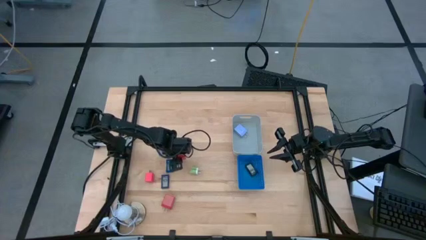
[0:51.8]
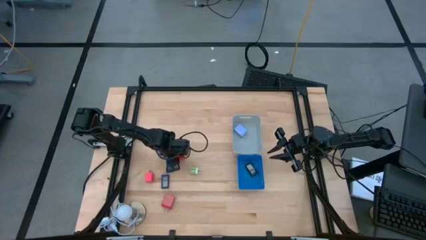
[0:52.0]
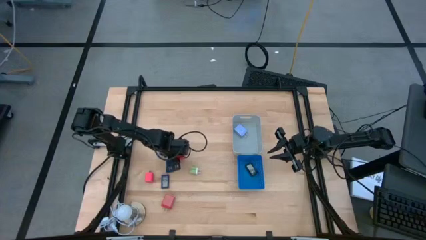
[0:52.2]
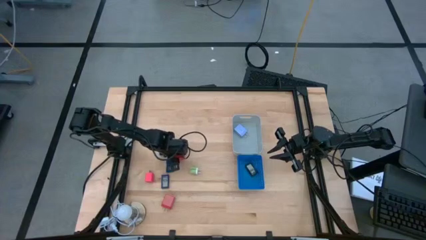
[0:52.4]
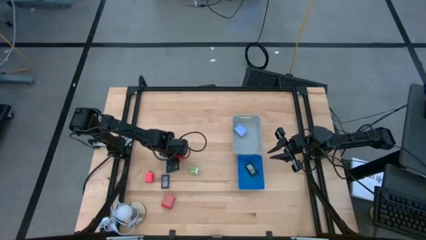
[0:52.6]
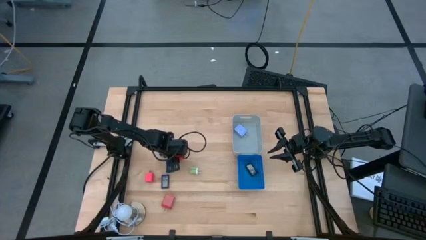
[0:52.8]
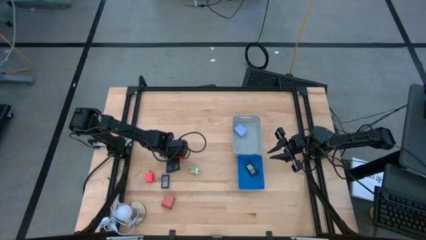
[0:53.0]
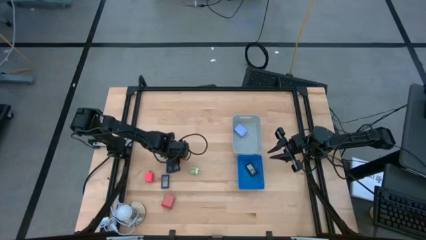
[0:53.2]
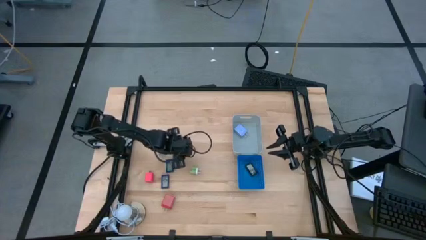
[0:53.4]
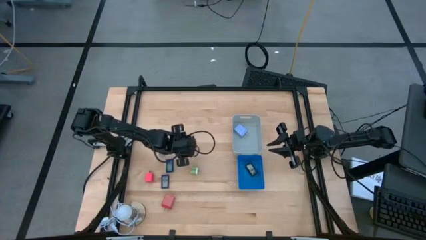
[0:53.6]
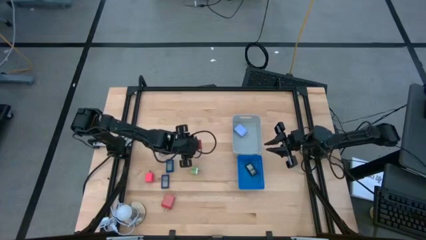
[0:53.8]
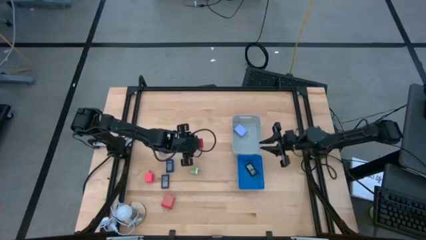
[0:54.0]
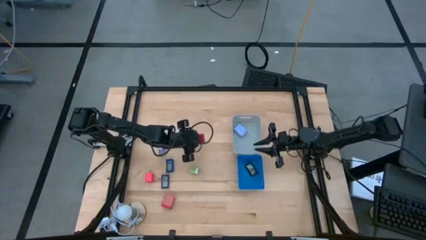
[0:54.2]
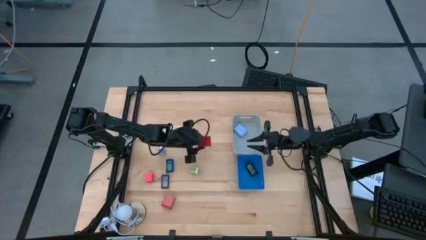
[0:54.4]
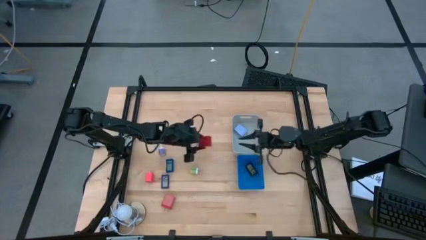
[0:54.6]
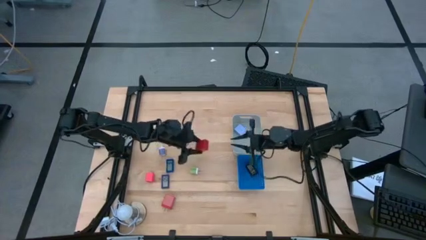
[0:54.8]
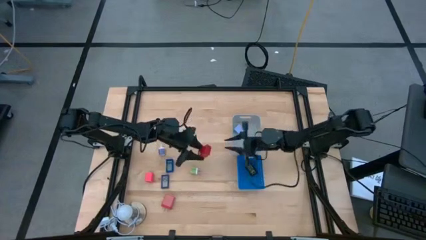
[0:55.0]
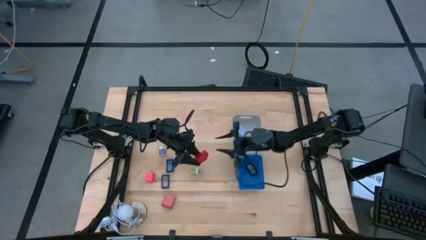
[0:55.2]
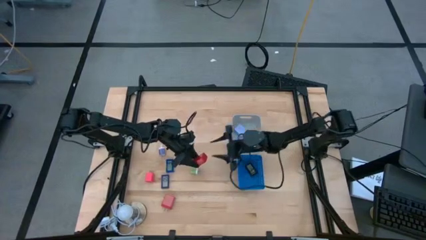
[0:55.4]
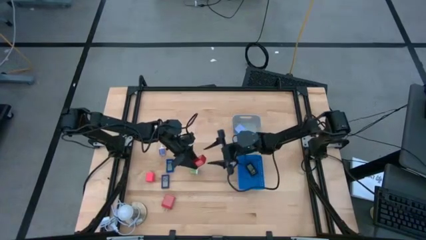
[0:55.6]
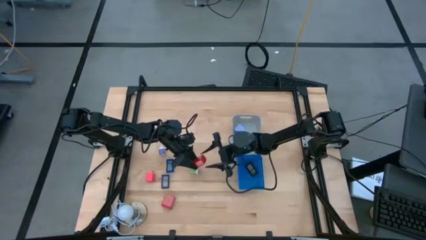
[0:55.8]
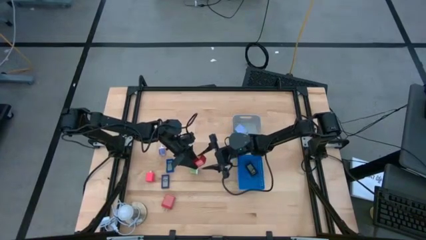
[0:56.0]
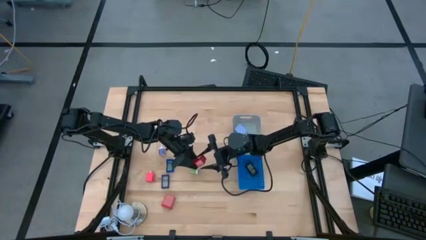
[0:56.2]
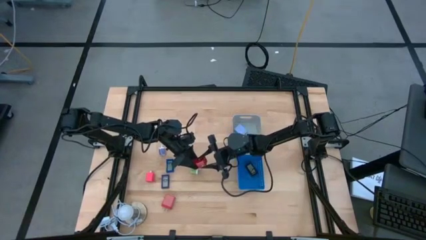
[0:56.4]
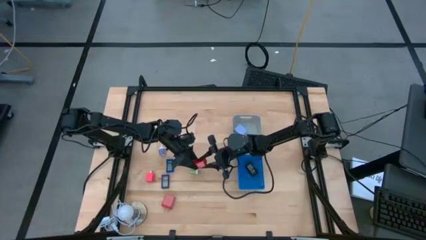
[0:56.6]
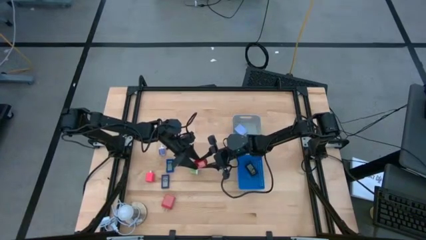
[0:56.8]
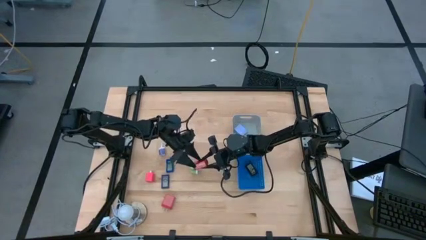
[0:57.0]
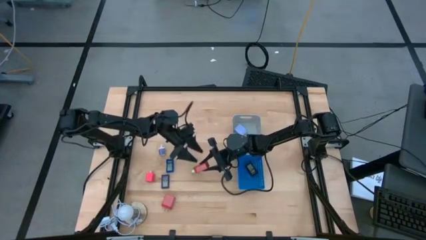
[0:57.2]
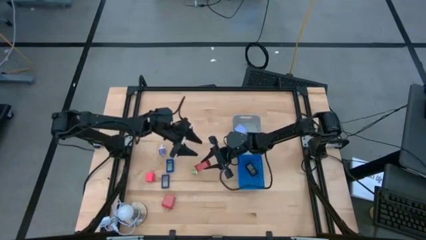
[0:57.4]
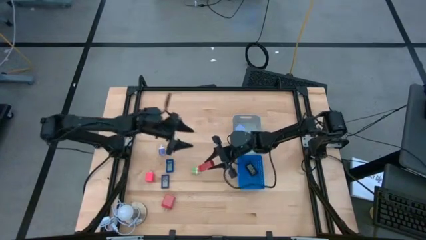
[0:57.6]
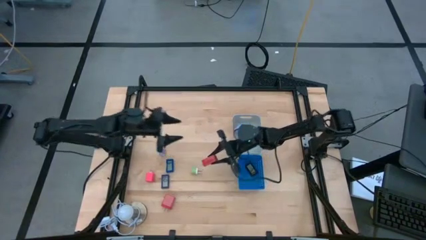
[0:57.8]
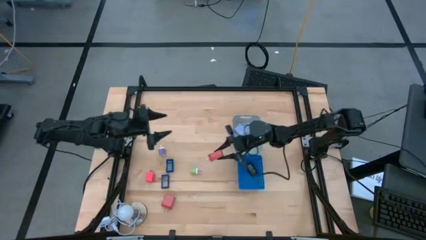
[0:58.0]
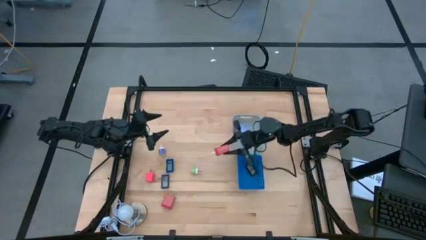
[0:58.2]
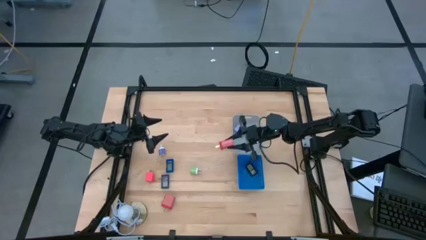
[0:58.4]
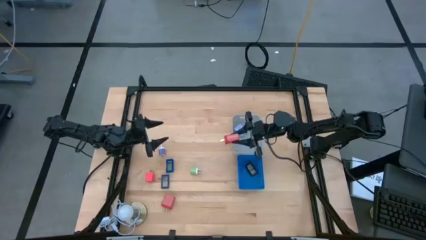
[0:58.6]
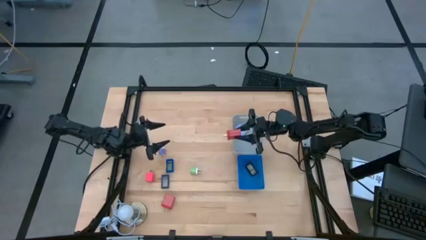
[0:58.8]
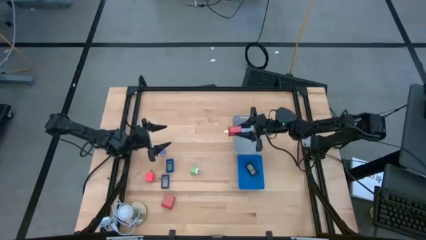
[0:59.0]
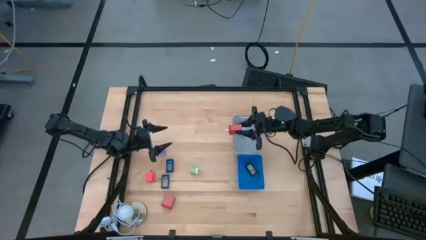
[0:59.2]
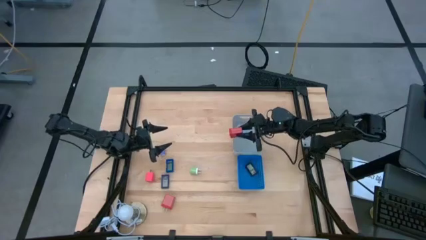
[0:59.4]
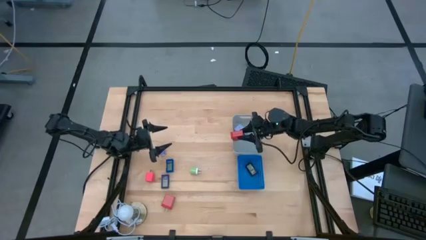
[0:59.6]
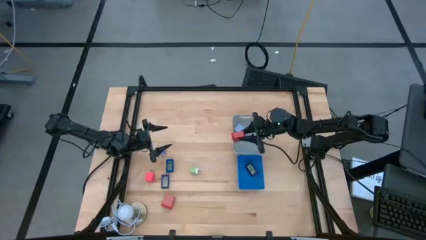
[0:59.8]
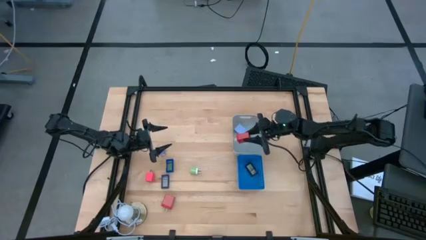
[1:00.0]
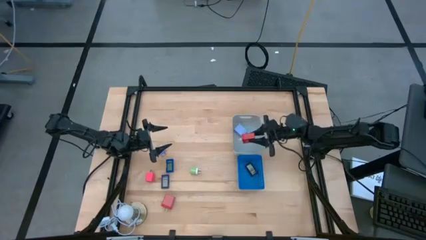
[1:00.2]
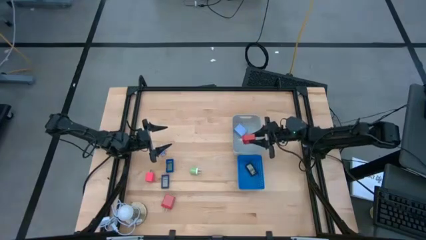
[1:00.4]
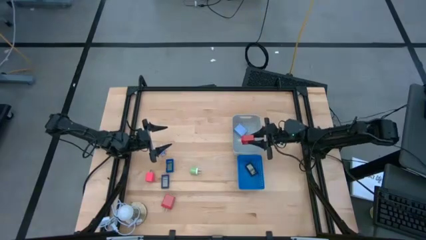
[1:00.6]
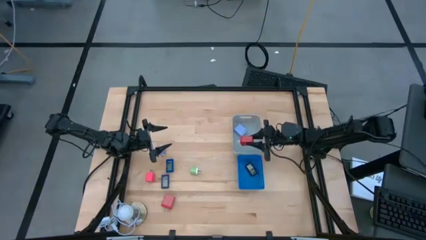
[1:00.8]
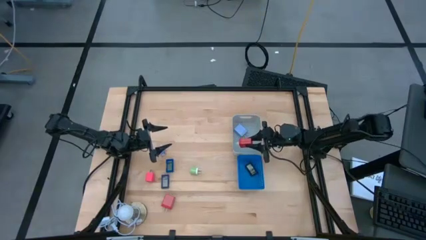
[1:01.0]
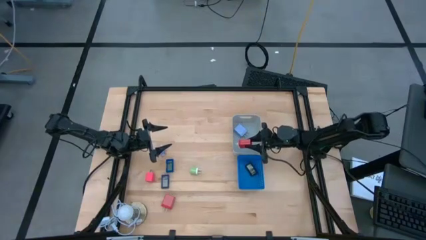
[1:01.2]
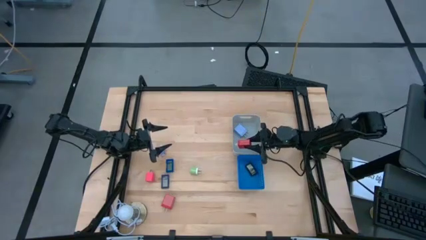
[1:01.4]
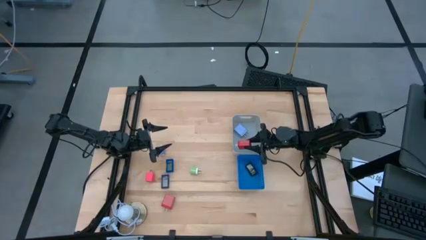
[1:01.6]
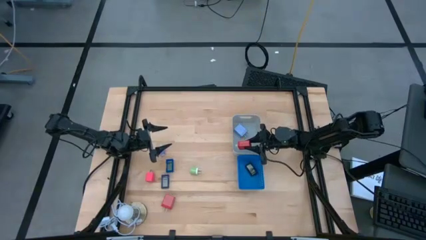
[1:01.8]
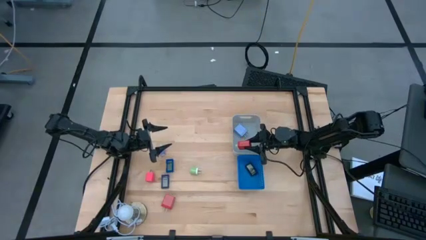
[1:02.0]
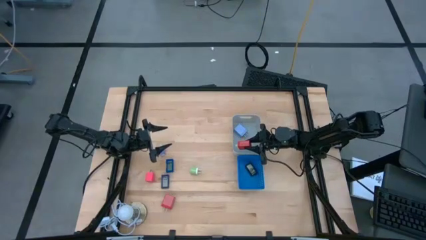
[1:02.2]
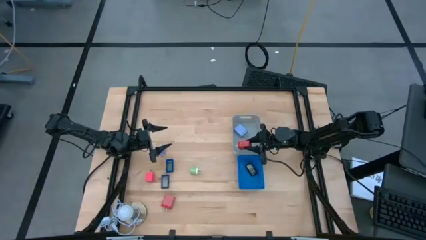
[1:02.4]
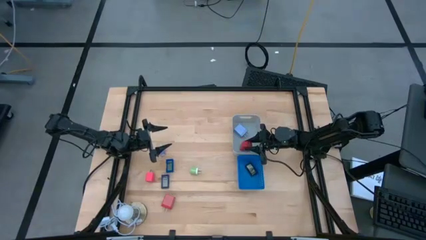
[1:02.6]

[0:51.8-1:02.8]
Task: Pick & Place Office items
Put the top red charger adapter into the gray bin

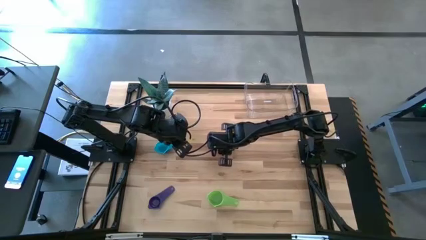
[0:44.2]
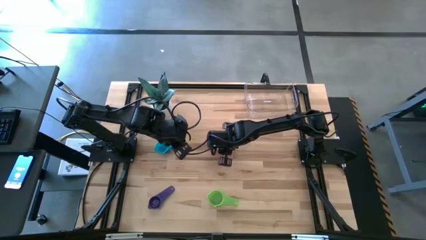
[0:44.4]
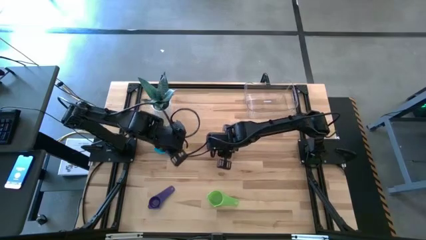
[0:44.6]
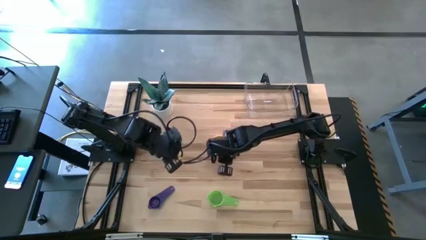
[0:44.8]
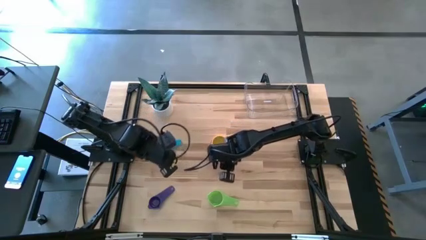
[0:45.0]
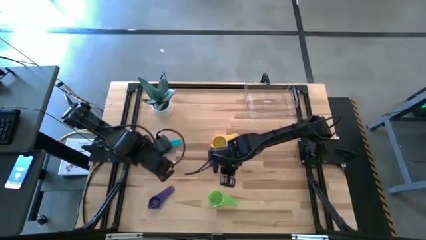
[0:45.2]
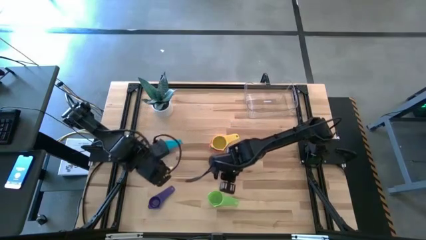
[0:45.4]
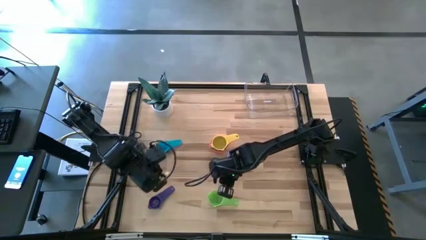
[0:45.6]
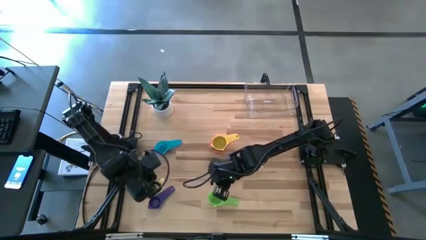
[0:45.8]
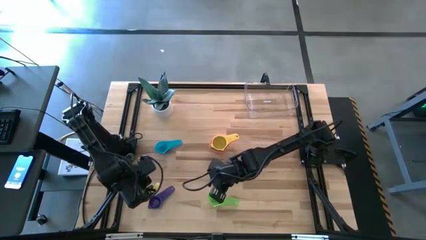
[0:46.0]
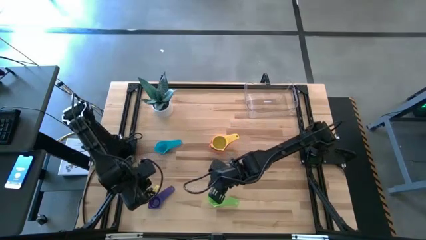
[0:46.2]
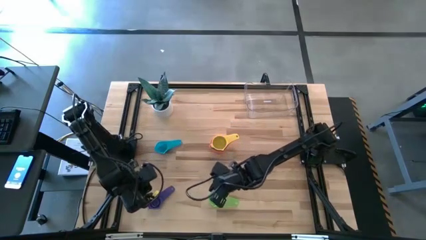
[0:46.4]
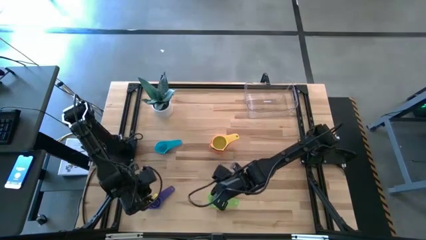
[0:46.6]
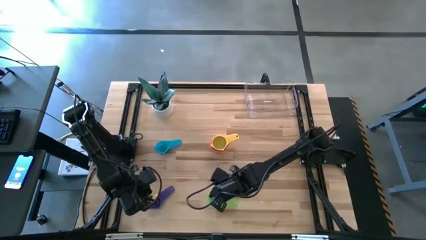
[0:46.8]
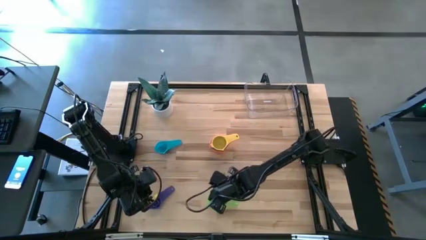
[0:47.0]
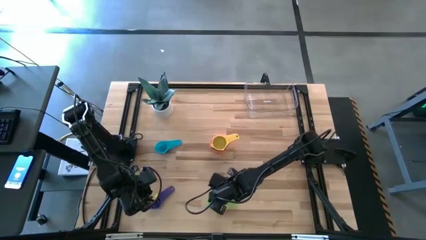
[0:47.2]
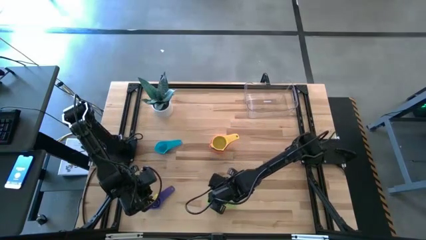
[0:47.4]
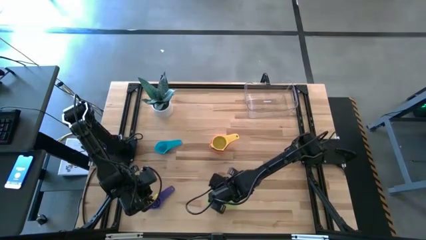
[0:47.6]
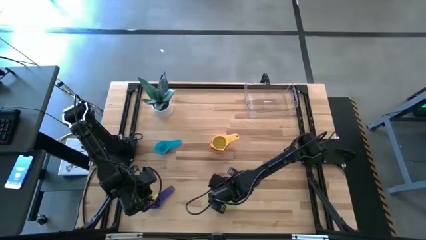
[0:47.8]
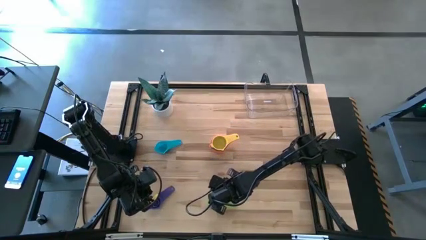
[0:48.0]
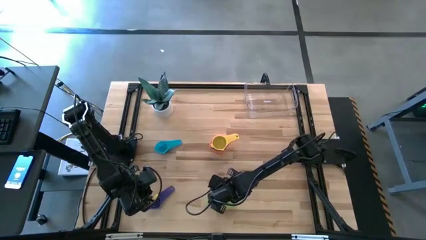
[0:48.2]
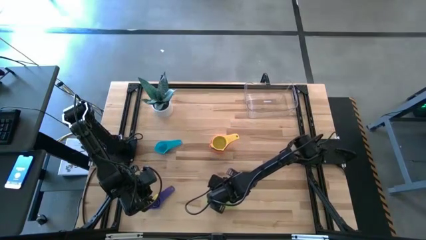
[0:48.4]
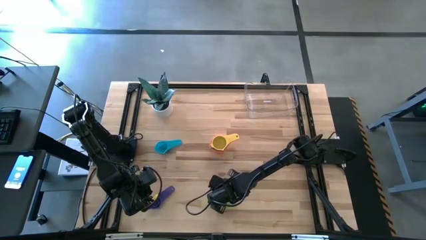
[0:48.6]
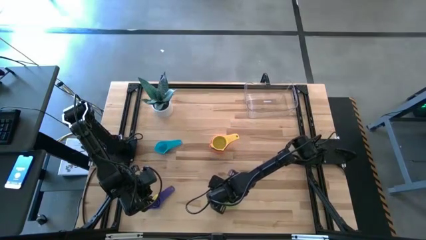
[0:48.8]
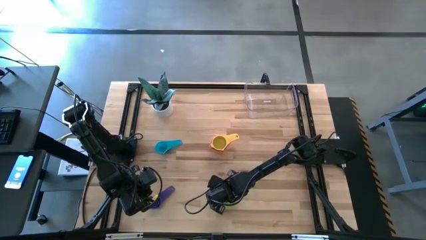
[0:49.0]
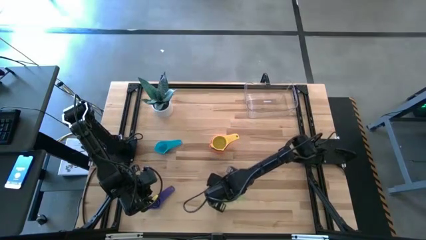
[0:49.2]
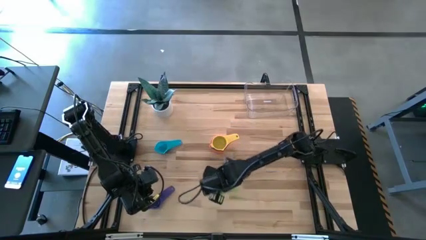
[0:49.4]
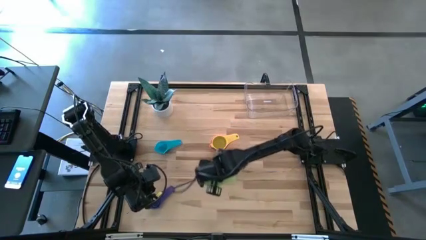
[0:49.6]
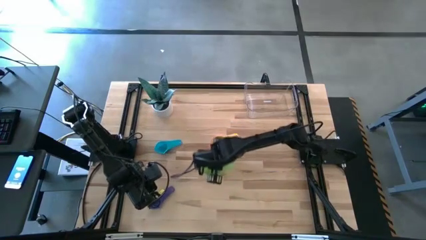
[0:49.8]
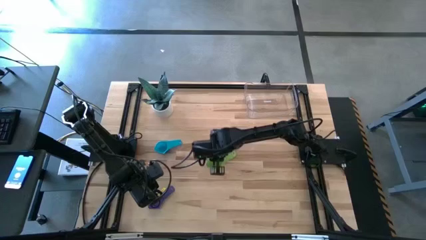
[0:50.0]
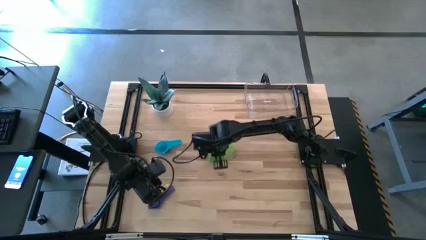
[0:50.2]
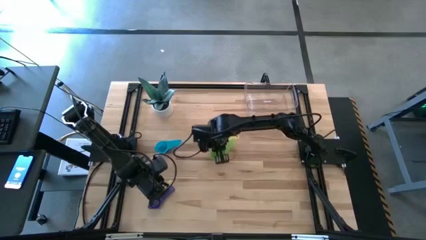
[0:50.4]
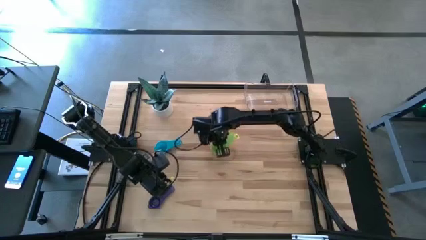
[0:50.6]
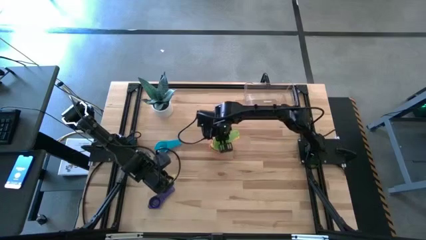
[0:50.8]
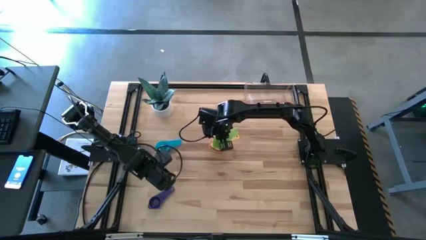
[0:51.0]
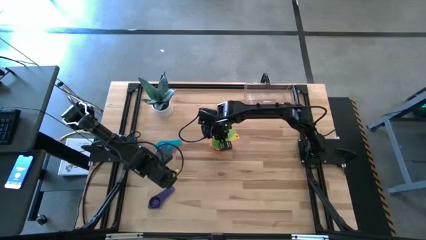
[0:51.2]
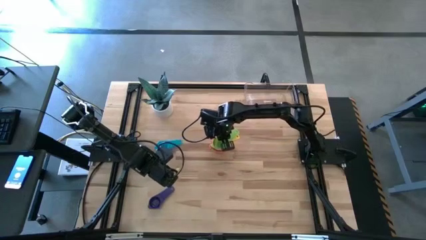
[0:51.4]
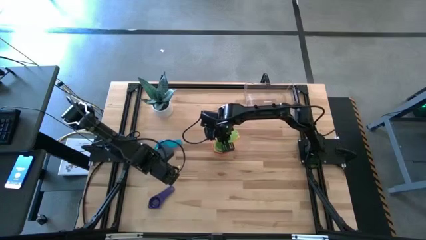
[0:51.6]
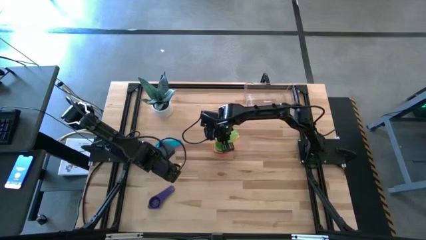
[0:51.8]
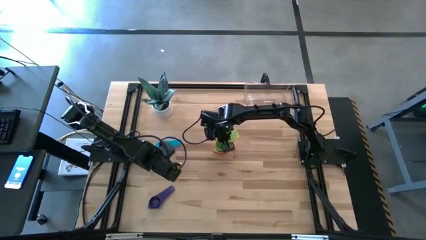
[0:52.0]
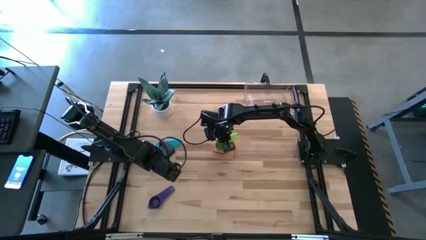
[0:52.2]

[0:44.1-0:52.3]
Task: Nest measuring cups in basket
Stack the green measuring cup on top of the yellow measuring cup
